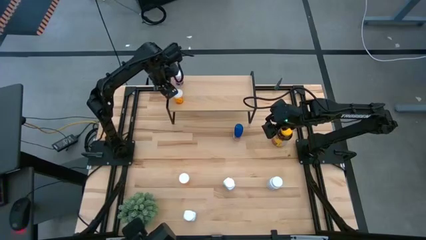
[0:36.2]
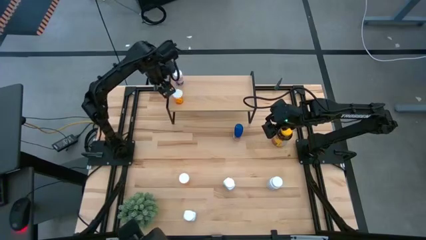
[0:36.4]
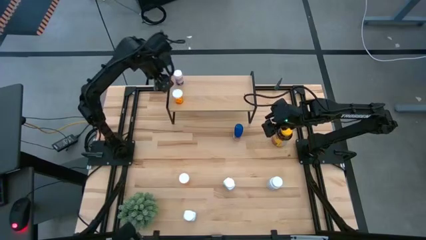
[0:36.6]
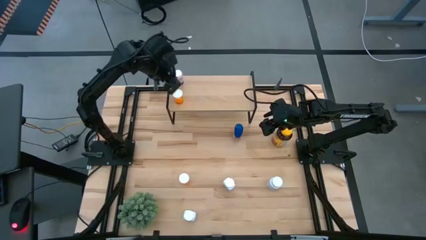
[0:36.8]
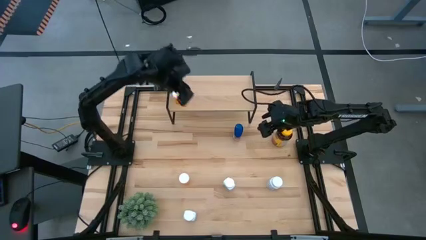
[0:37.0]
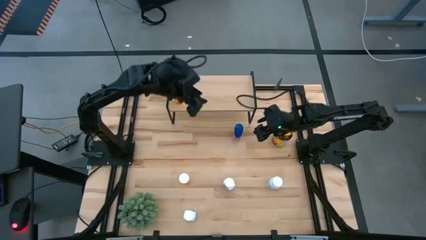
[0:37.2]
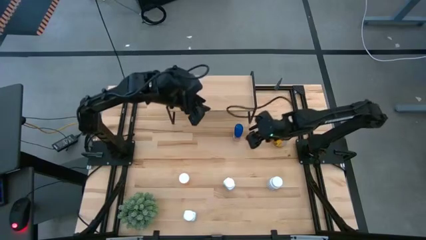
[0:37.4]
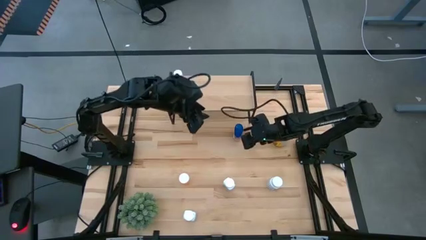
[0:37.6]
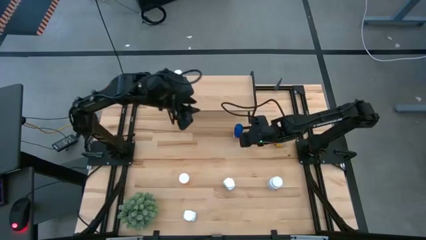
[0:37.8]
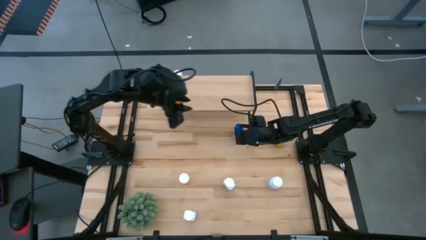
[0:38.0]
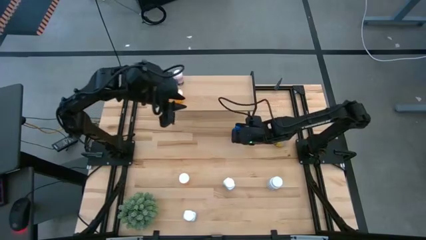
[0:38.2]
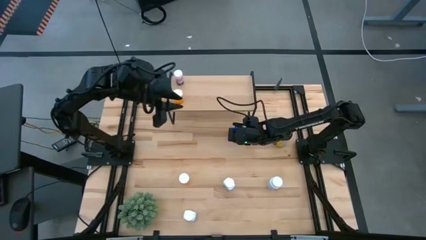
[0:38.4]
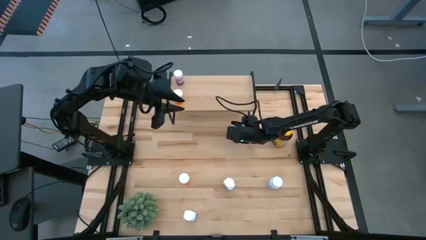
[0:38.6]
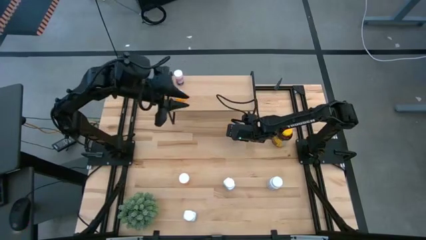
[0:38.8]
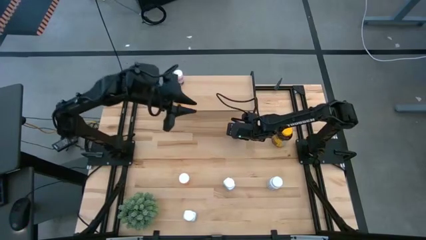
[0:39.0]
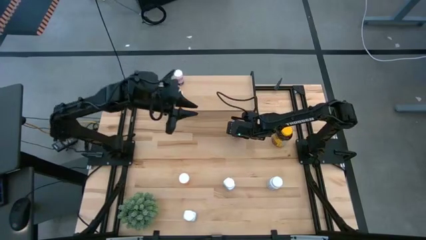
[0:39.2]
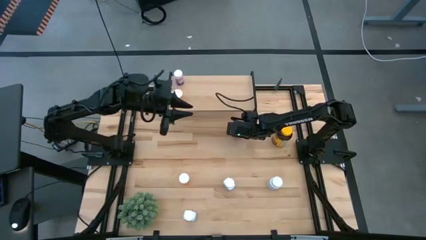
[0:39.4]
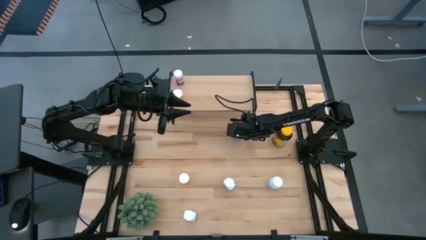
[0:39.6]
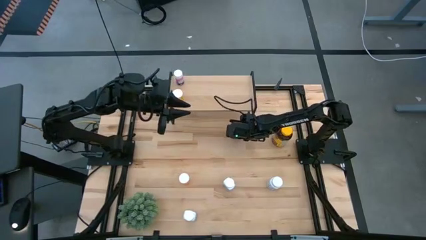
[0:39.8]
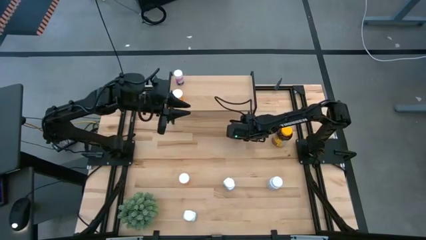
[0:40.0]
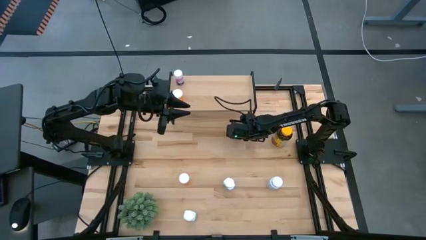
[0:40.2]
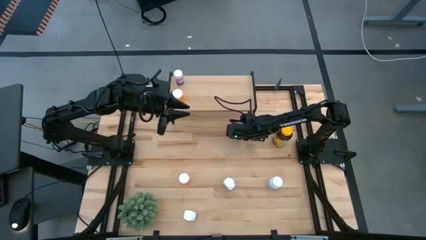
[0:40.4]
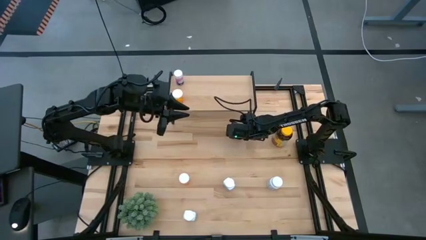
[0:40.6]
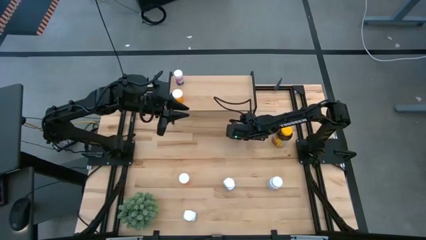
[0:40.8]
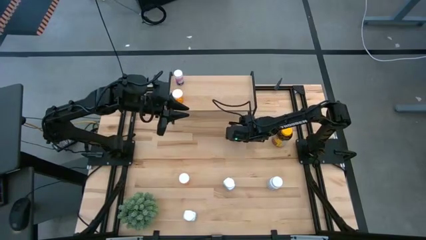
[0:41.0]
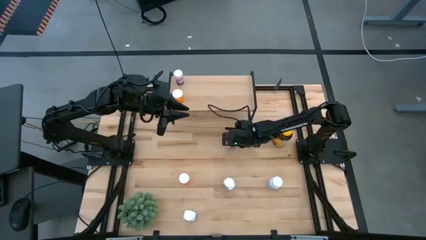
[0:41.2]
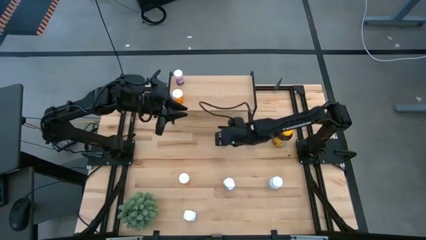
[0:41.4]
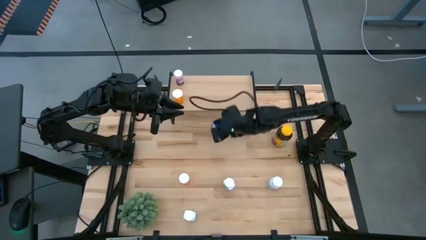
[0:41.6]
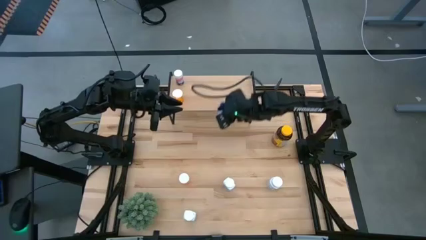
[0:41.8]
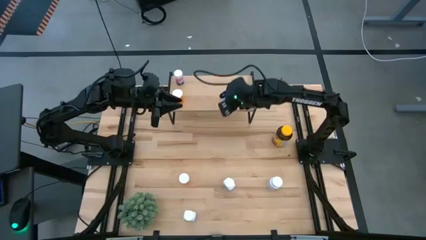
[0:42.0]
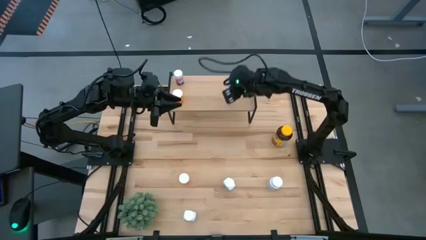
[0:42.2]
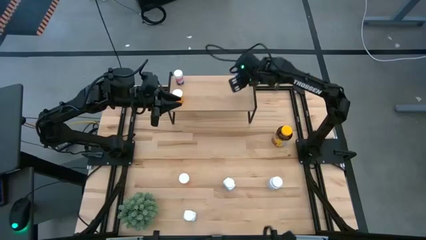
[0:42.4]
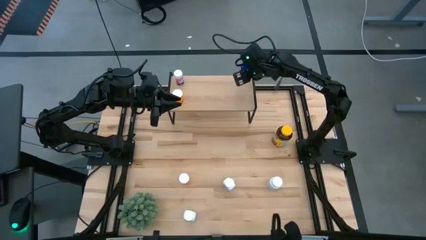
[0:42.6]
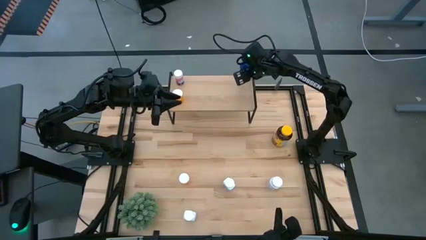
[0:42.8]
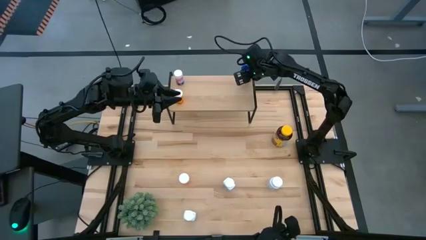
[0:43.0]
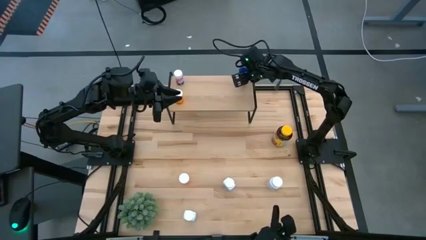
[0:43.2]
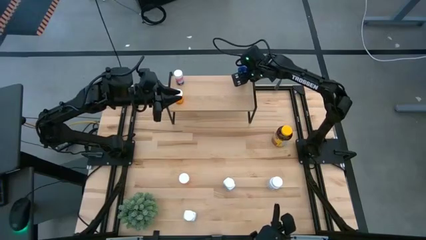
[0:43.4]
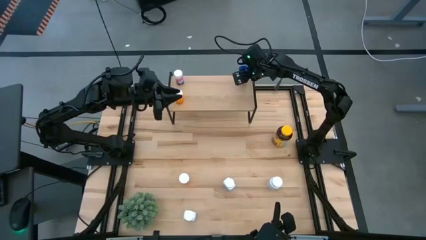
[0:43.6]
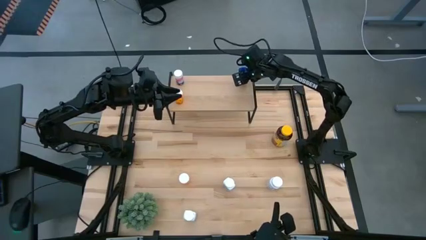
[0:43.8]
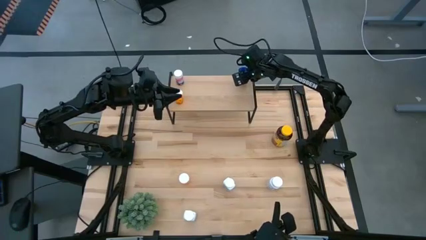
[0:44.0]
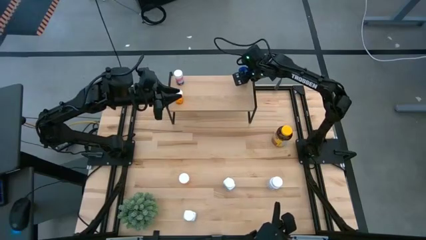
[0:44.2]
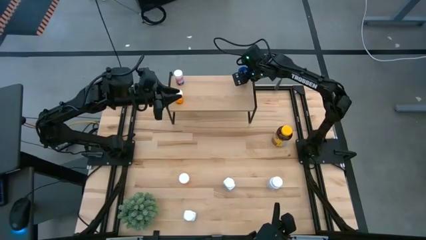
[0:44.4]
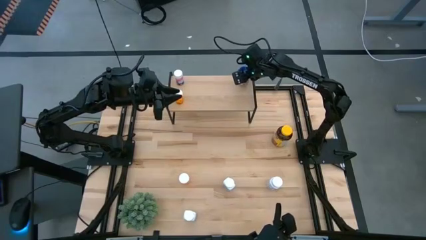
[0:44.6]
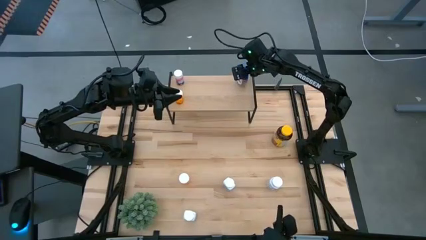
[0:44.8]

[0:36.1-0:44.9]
Task: Pick and place medicine bottles onto shelf by color
Put the blue bottle on the shelf

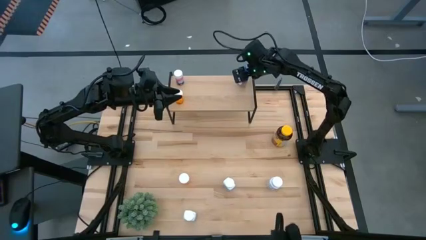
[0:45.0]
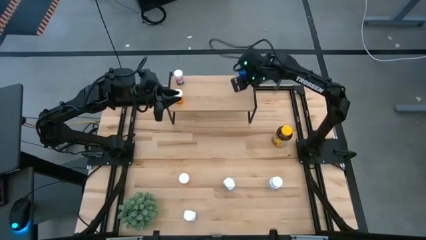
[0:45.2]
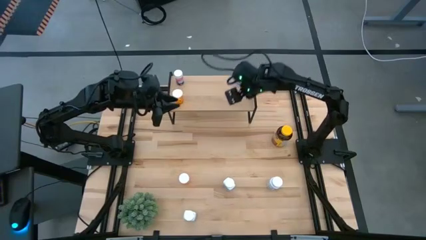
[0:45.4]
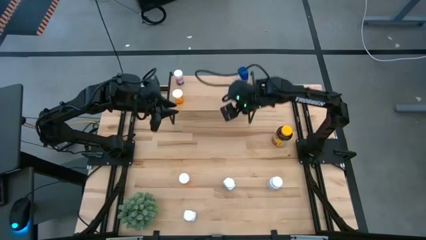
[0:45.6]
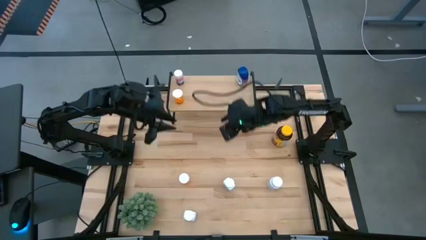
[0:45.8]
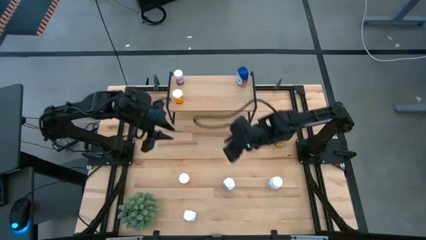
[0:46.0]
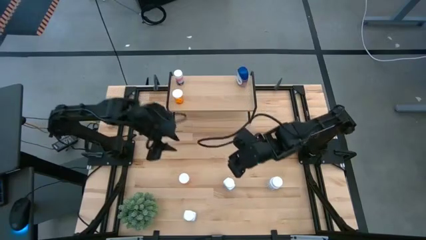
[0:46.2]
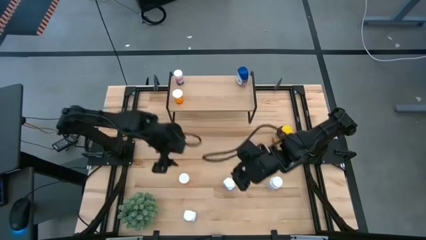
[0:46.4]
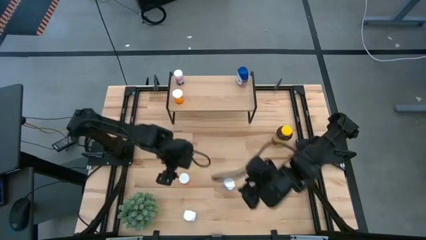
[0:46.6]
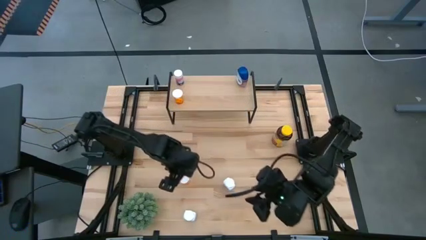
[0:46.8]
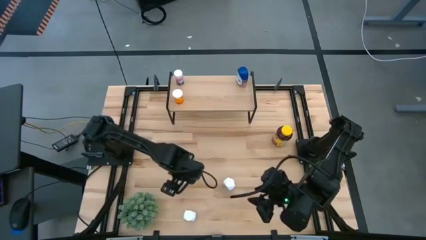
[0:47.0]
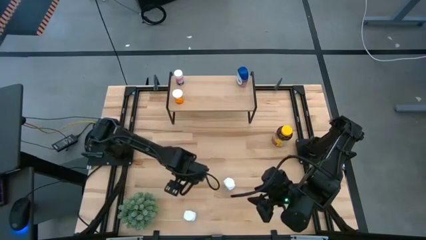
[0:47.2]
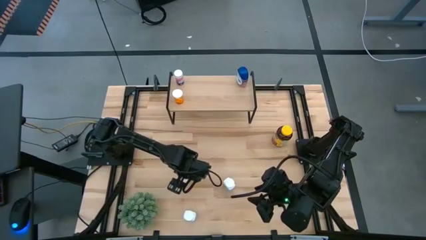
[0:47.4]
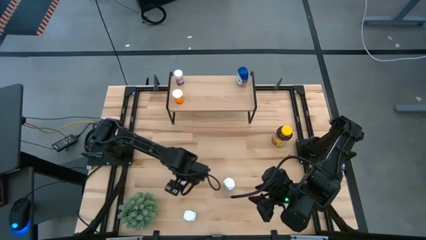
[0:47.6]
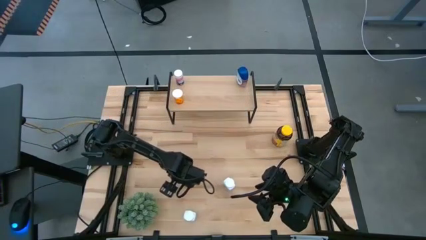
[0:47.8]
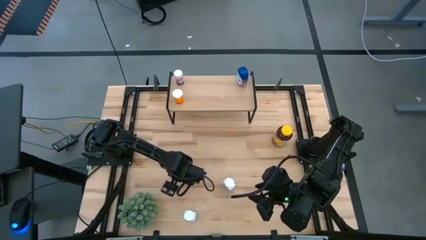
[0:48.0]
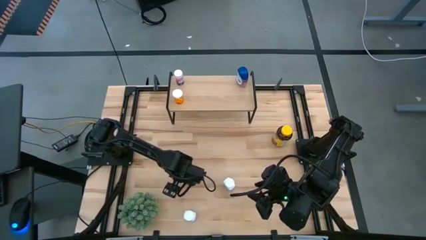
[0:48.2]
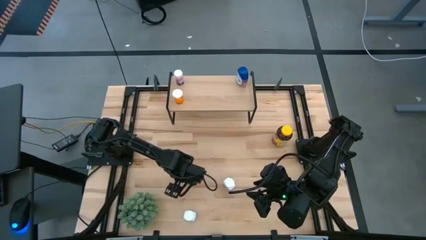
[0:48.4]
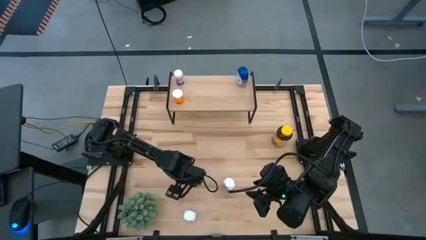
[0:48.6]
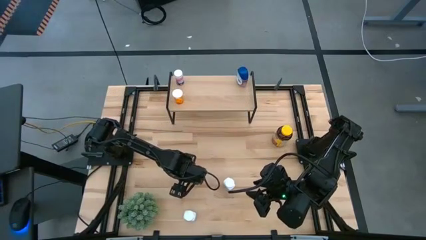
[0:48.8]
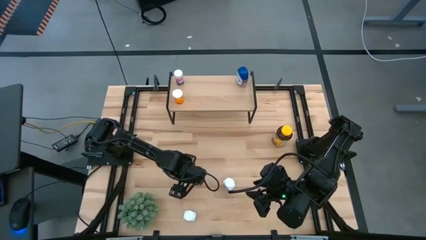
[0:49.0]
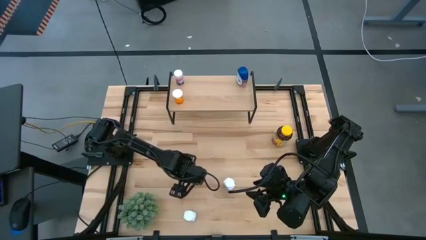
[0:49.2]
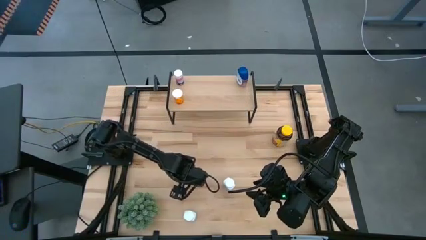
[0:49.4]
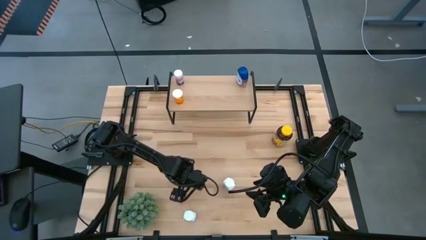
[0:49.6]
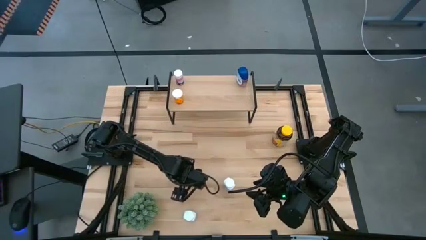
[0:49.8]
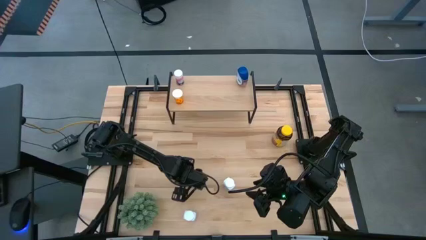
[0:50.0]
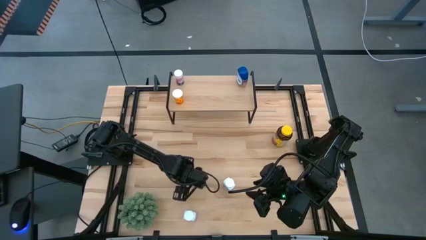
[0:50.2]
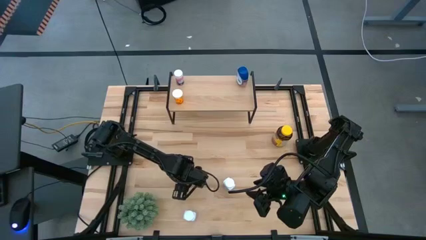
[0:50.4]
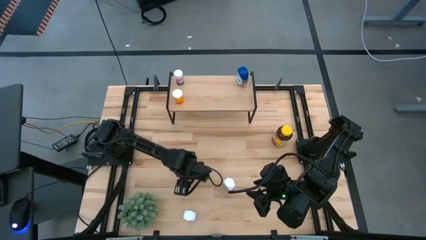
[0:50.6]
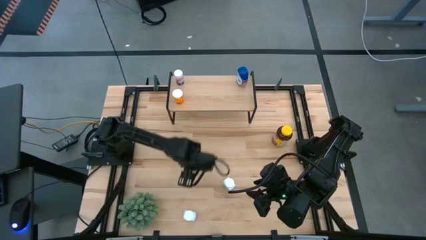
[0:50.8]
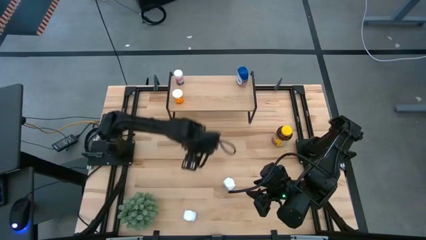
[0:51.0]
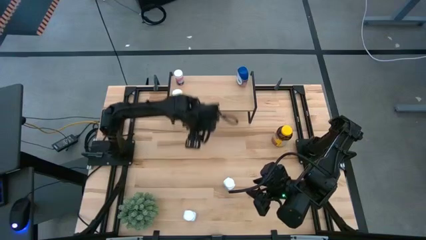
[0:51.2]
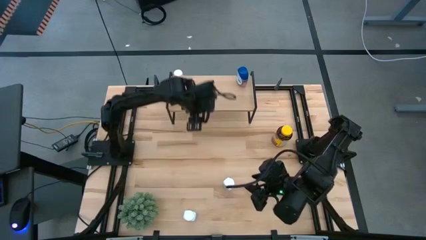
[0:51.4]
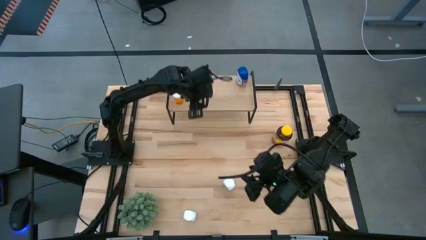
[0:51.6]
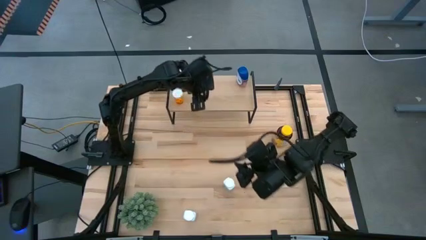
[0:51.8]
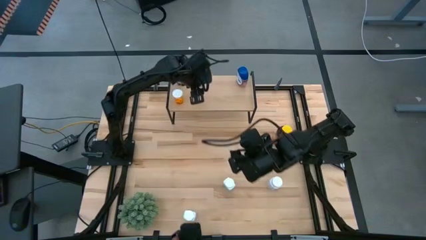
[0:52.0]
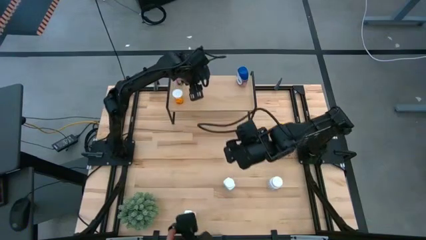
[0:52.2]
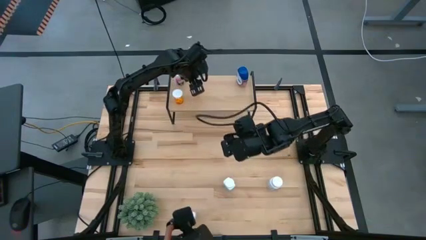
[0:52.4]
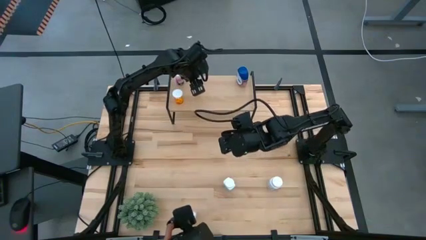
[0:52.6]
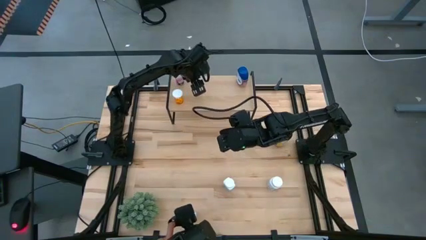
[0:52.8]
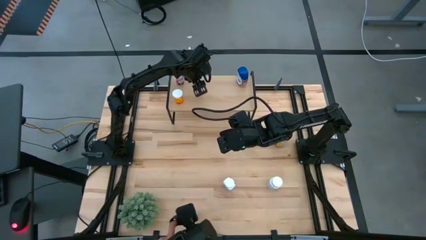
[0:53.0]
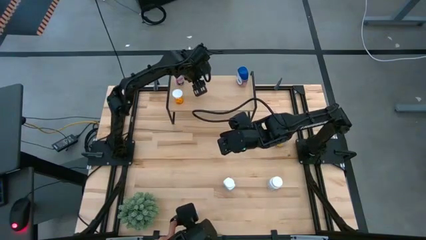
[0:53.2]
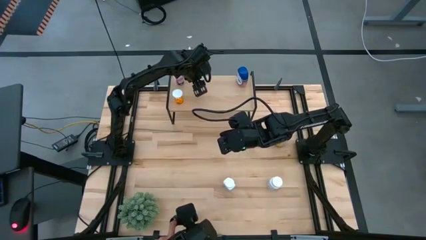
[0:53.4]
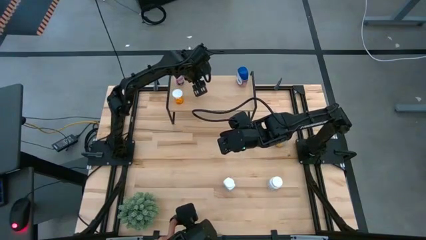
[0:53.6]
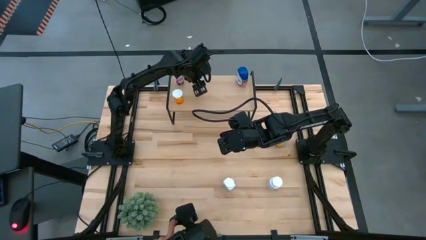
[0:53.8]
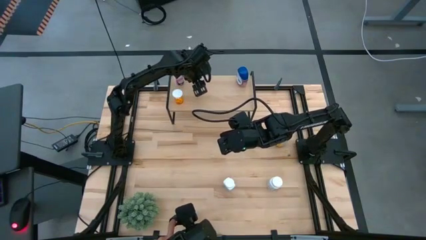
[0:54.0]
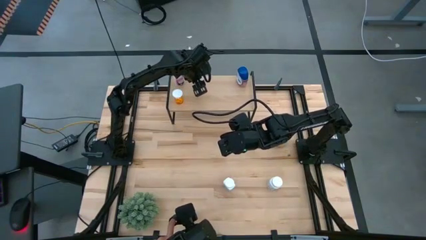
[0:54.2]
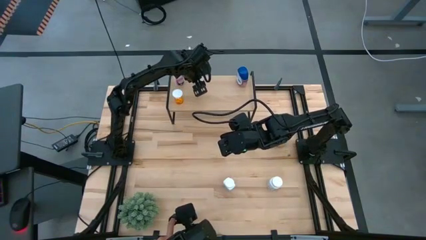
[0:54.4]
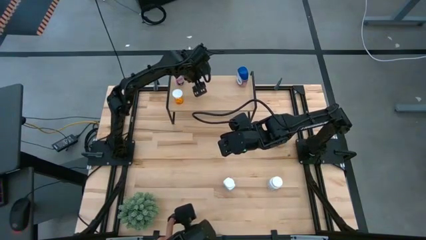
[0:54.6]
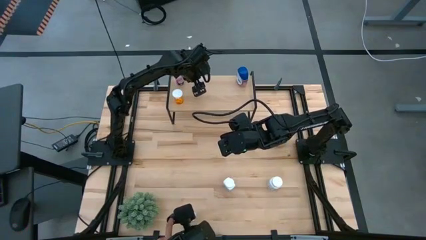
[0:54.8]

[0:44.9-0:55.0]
Put the orange medicine bottle on the shelf
